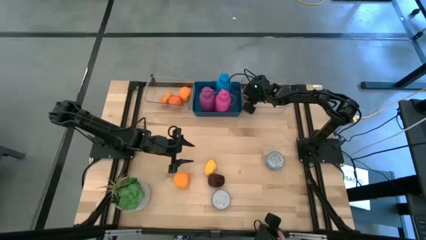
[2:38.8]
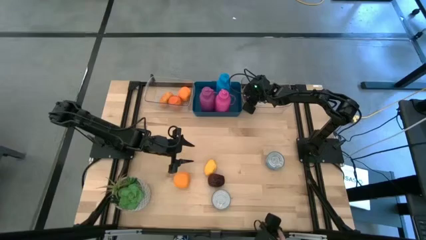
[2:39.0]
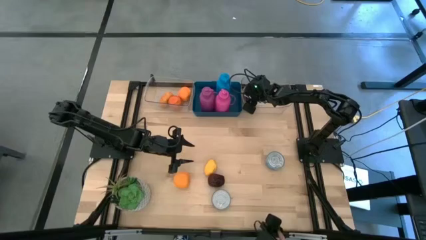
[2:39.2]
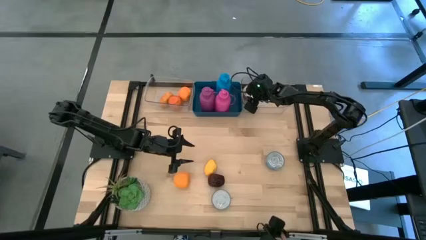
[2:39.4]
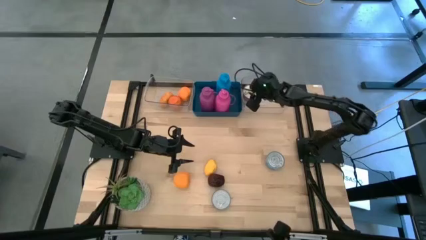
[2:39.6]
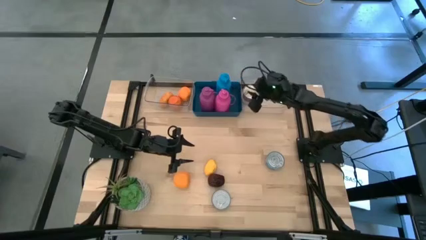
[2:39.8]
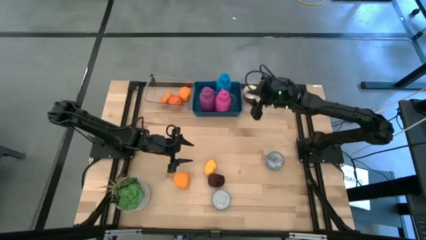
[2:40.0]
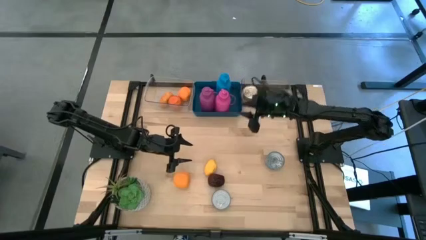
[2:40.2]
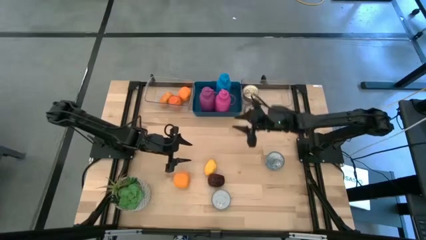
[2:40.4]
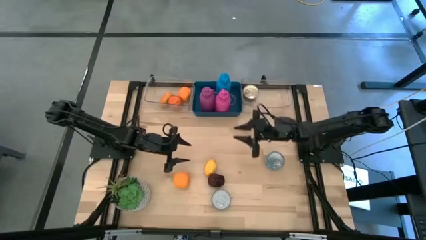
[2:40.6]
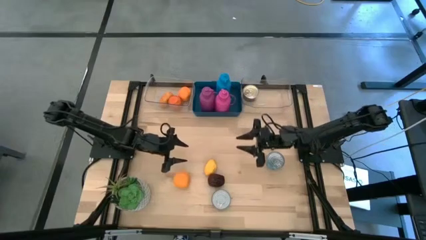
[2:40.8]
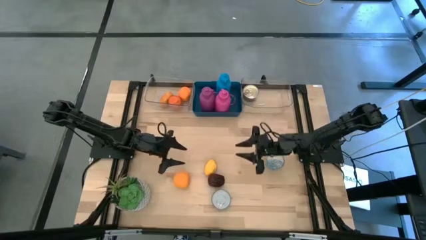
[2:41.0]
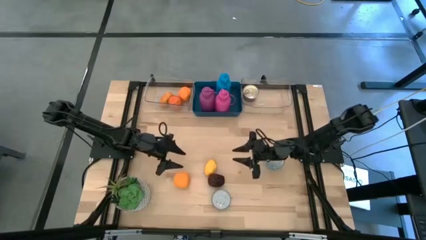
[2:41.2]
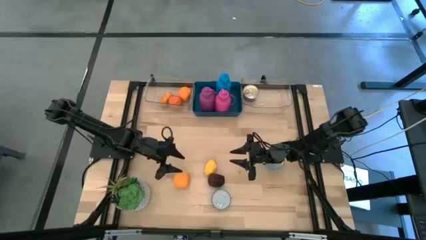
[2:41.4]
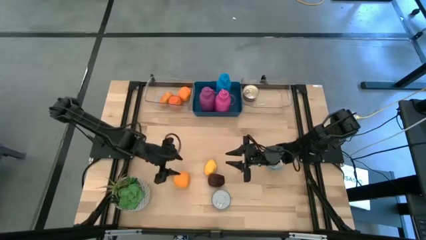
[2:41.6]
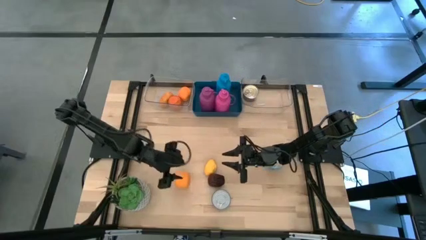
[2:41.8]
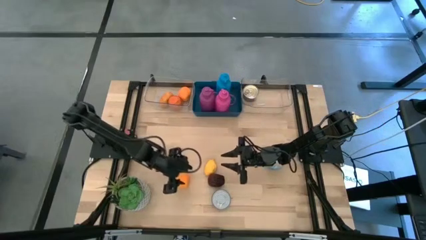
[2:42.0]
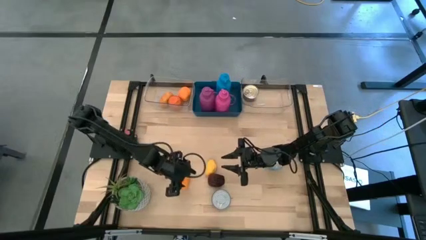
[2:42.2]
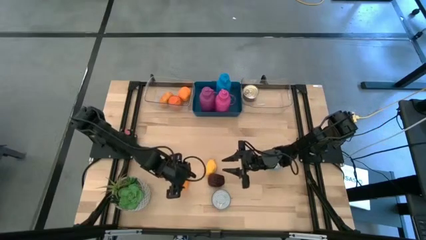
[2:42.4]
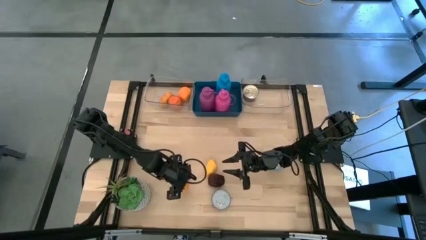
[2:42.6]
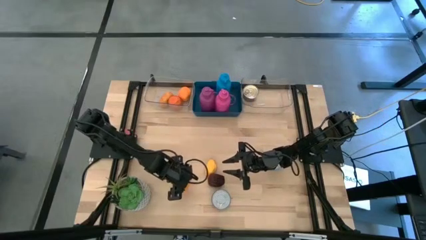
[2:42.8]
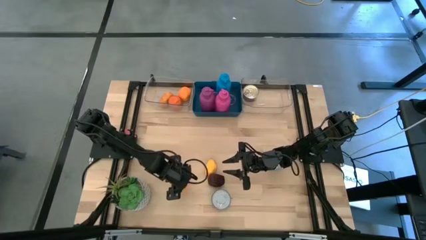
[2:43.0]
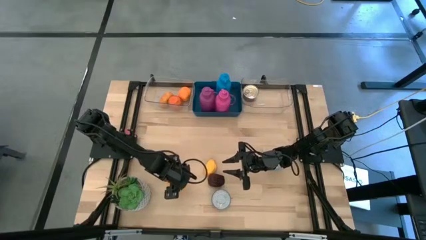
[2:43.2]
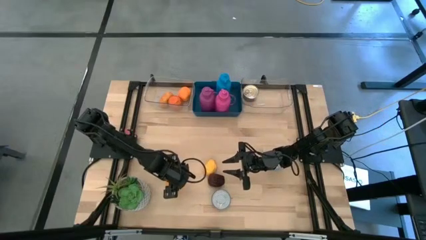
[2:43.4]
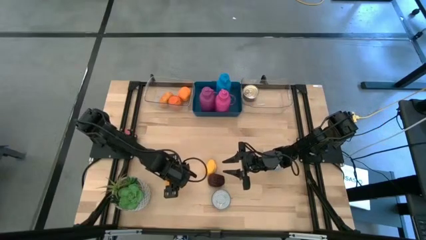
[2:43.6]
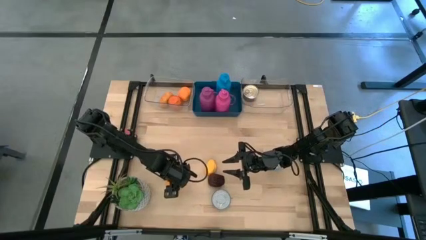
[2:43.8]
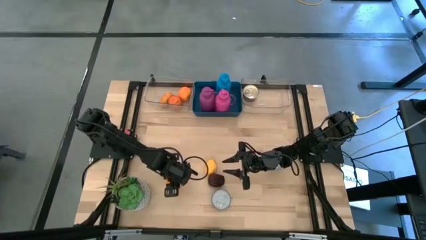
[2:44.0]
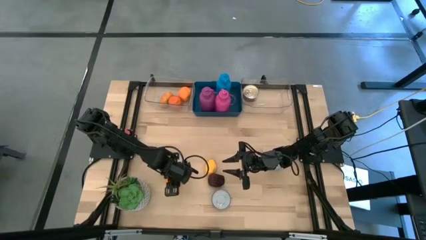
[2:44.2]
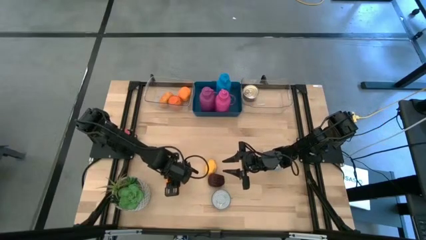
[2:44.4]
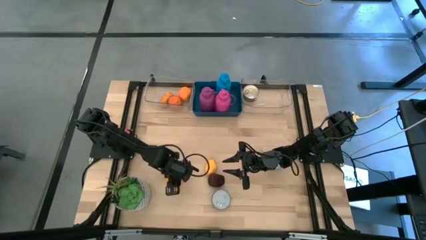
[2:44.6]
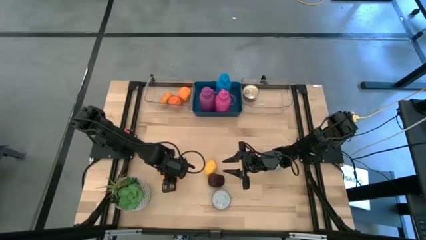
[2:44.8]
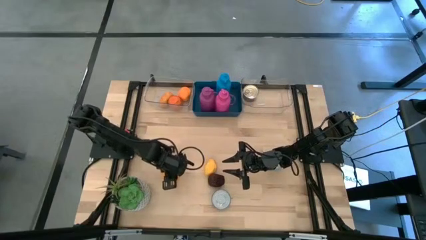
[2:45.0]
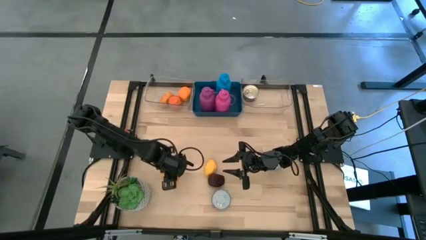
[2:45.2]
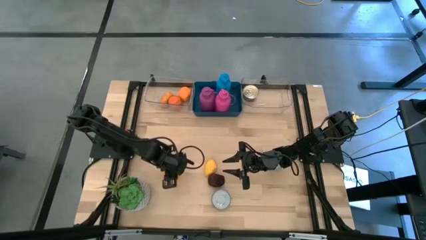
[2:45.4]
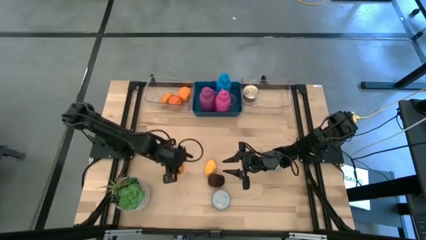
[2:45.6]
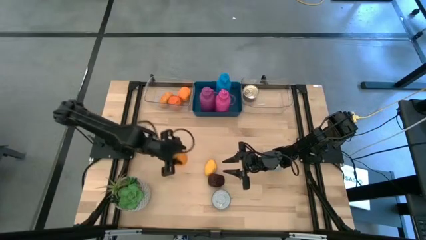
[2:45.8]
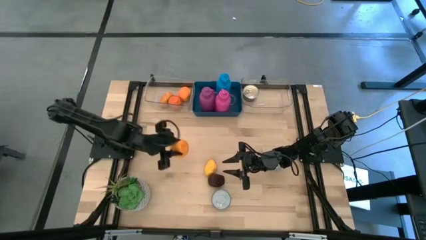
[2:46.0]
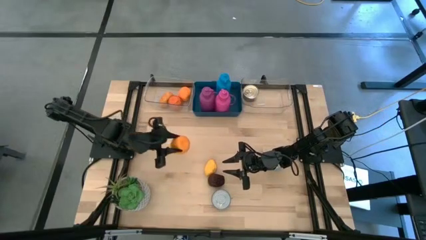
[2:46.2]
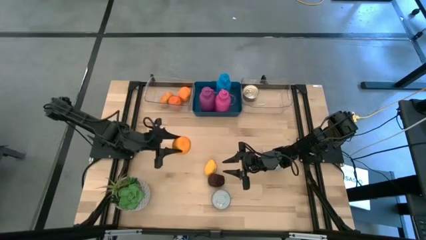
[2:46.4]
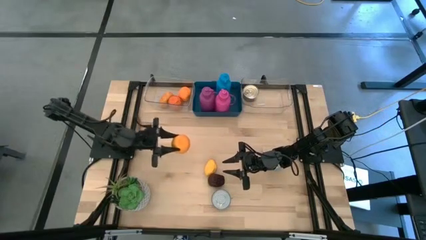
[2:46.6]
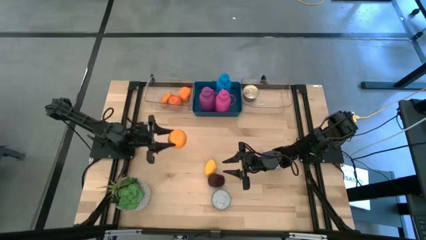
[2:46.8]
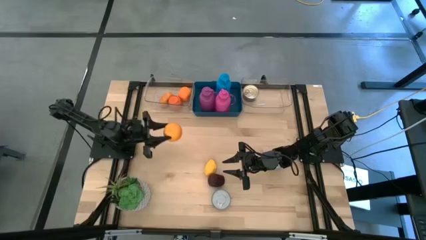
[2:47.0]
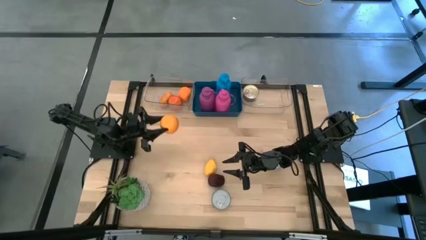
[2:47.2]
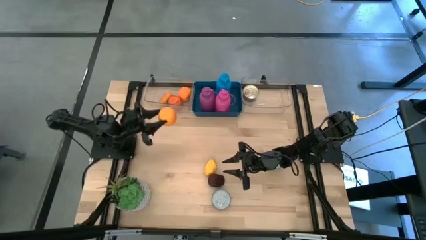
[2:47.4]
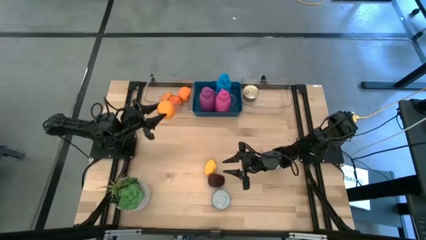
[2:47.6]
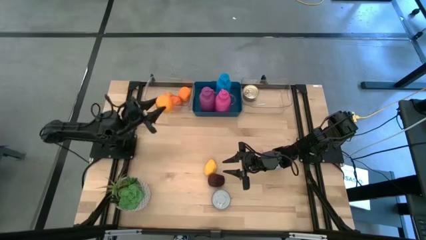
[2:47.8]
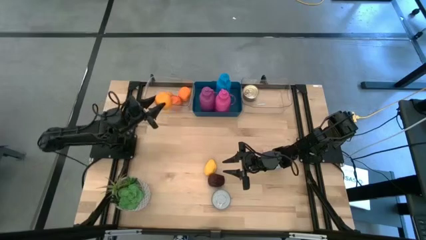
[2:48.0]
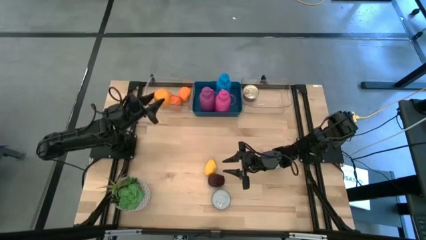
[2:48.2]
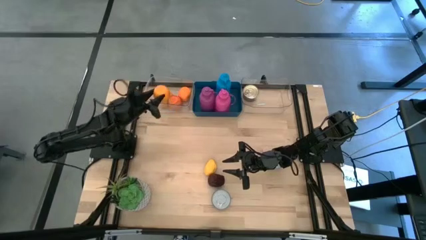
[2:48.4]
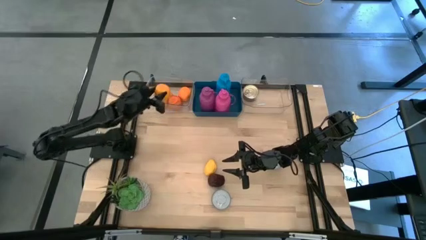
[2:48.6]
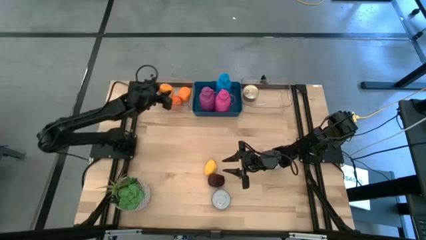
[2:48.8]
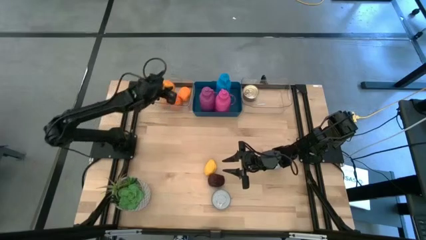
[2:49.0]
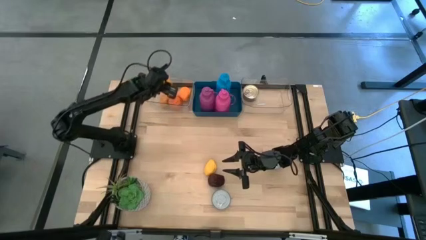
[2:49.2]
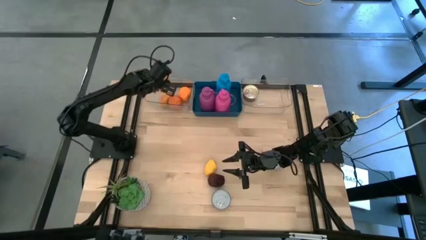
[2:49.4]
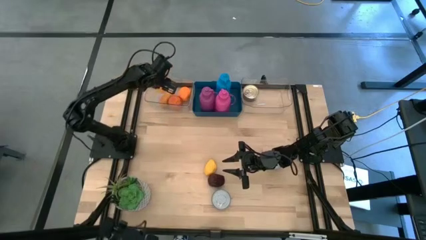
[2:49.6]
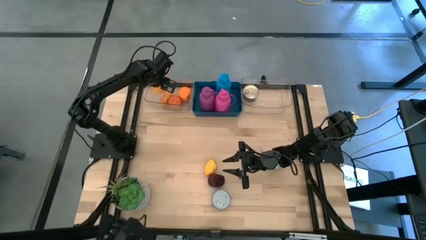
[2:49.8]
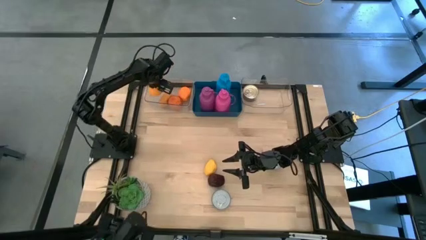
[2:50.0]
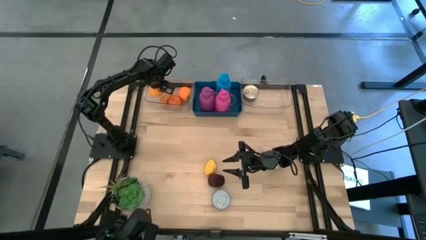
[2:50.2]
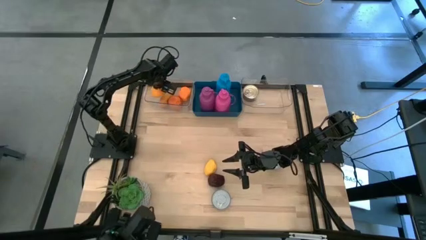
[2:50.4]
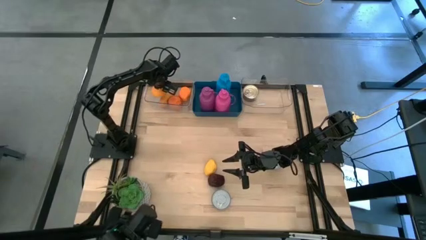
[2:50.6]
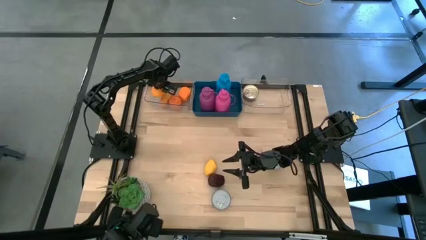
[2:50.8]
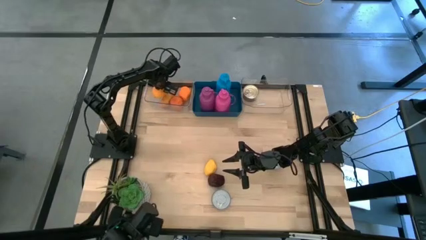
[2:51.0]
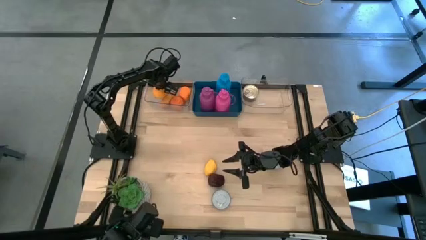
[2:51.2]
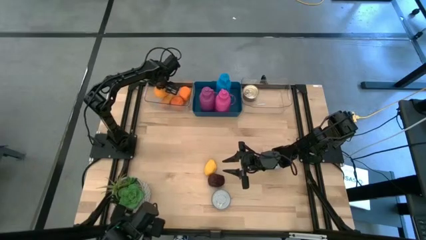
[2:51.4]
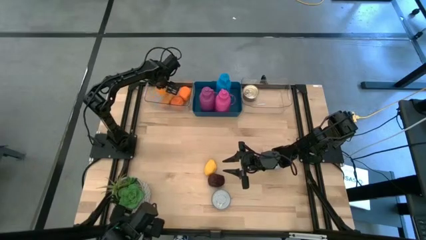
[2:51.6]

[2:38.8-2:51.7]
Task: Pick & Place Food Item
Put the orange into the left transparent bin

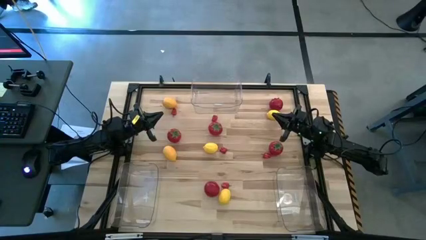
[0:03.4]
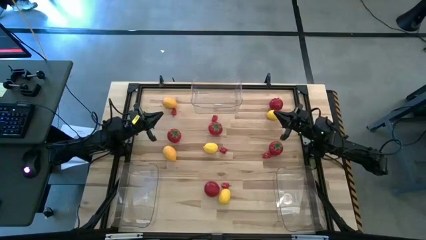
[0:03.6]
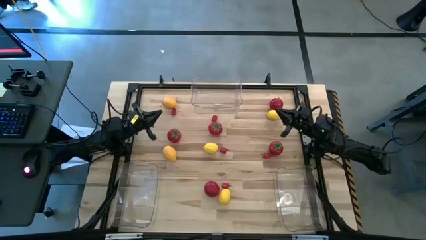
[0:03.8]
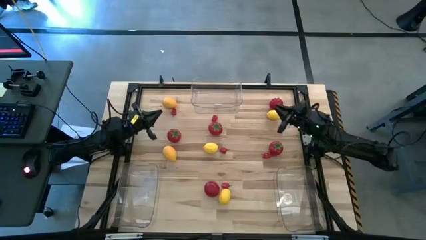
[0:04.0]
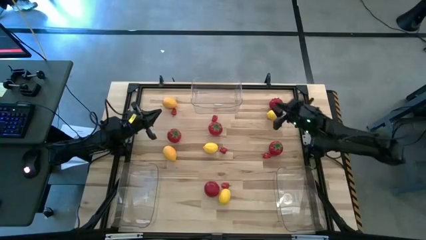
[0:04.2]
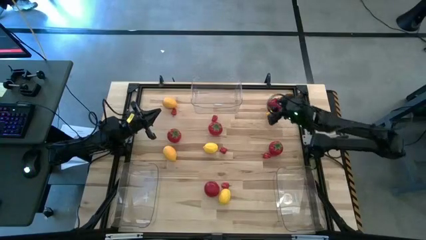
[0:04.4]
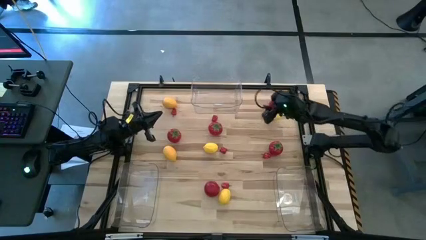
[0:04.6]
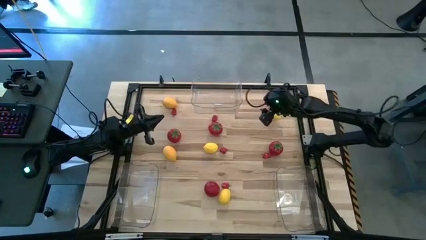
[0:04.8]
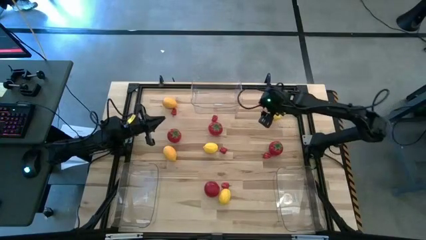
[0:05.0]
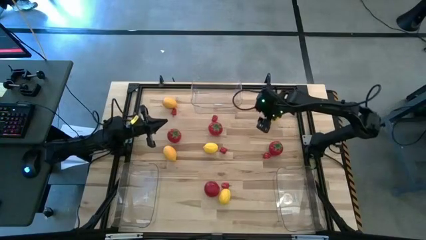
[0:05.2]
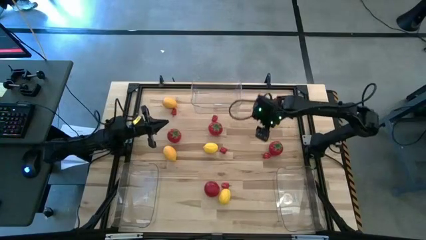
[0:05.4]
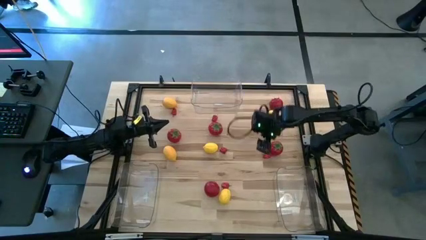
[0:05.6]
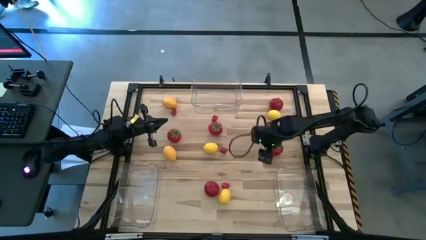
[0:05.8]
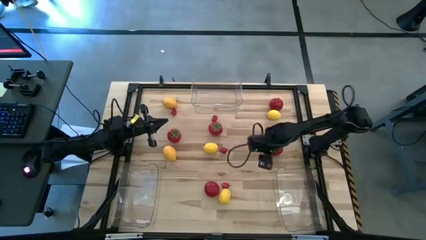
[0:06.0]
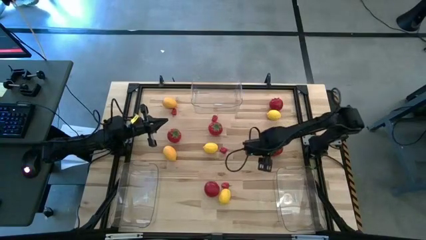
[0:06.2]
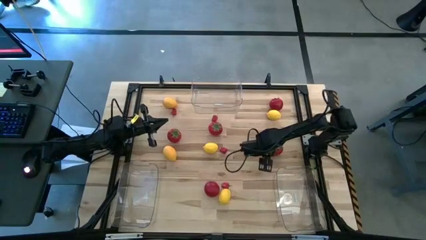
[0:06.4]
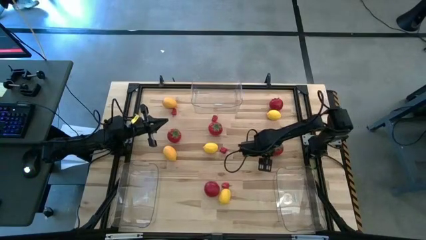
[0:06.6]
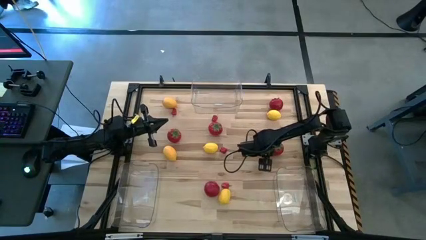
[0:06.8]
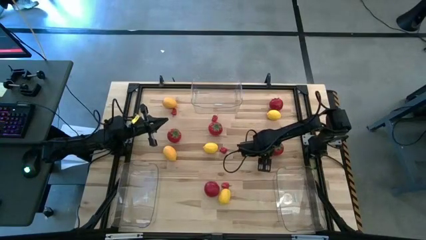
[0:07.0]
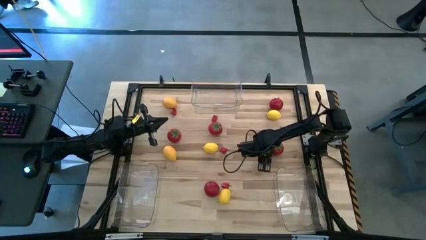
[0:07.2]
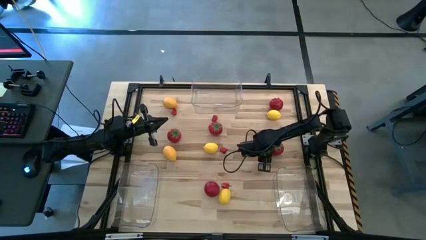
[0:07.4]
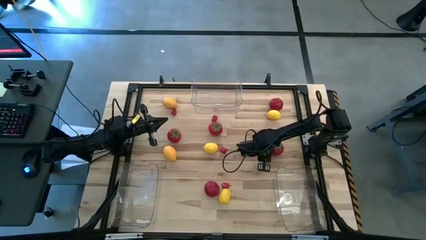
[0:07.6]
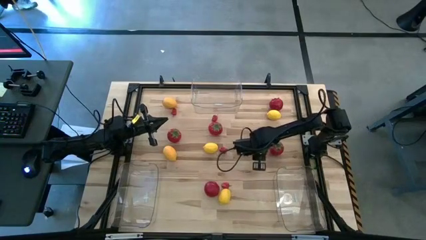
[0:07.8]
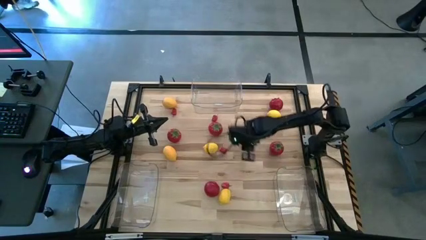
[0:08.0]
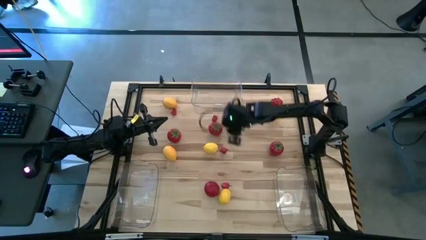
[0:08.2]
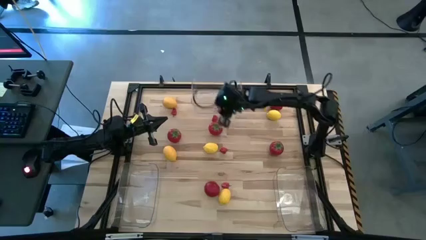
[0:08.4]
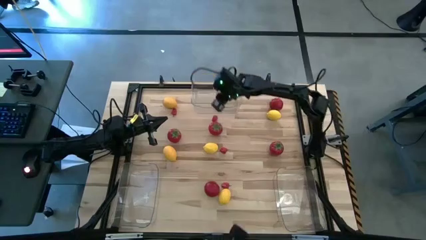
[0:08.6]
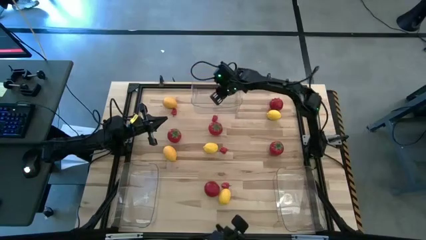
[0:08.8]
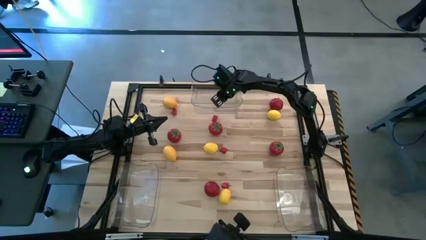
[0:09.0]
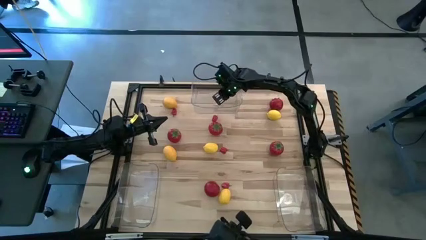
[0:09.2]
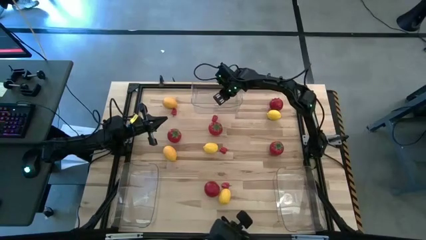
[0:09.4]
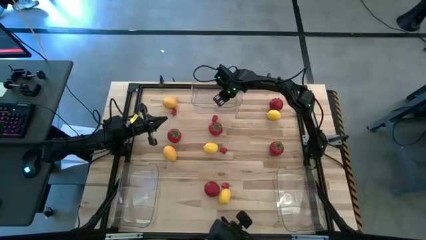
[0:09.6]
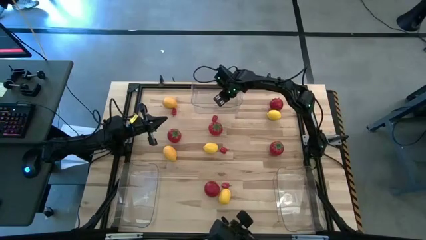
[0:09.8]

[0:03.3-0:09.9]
Task: Sort produce into baskets
Put the red chili pepper into the top center transparent bin
